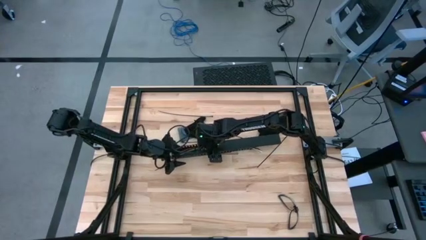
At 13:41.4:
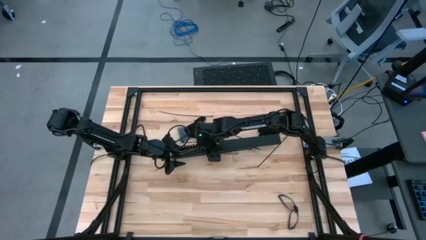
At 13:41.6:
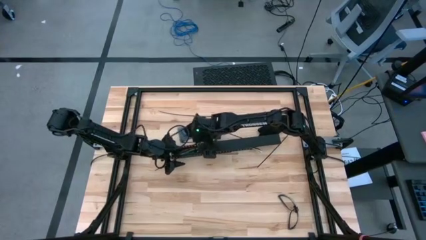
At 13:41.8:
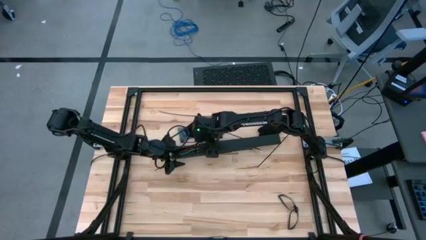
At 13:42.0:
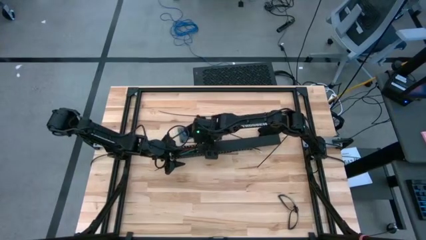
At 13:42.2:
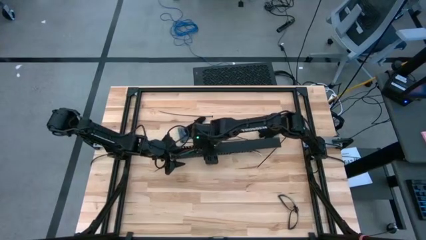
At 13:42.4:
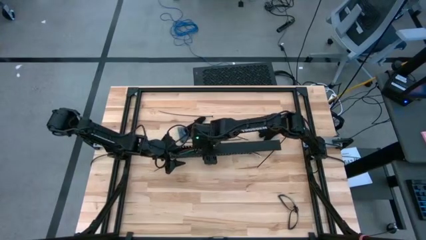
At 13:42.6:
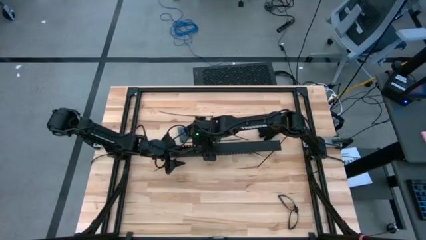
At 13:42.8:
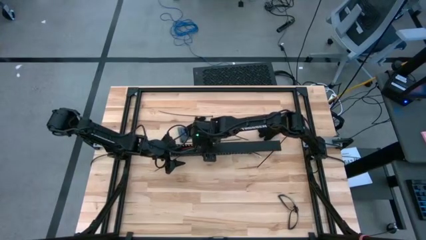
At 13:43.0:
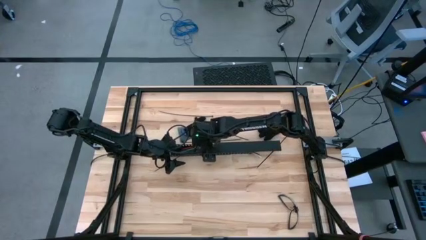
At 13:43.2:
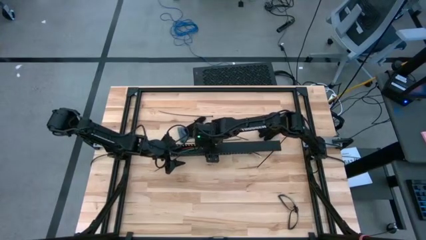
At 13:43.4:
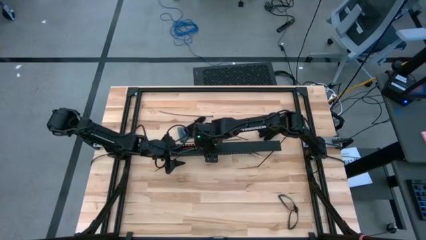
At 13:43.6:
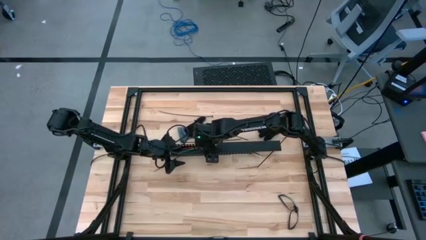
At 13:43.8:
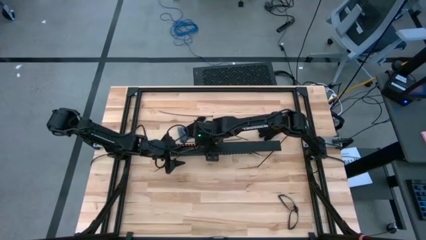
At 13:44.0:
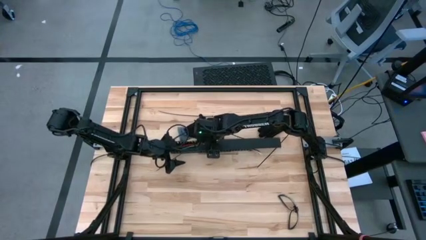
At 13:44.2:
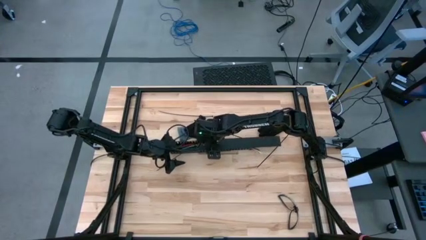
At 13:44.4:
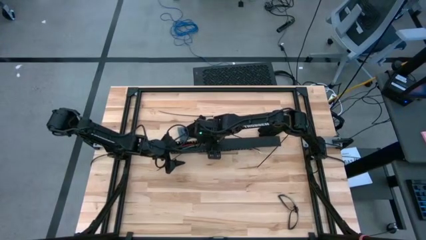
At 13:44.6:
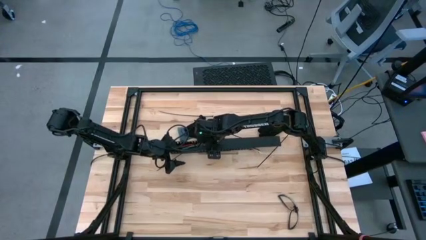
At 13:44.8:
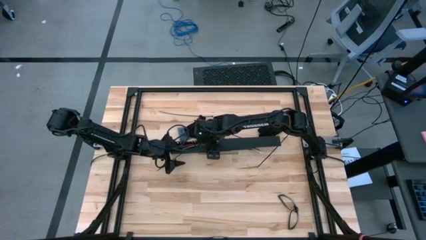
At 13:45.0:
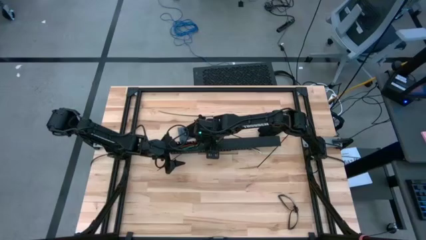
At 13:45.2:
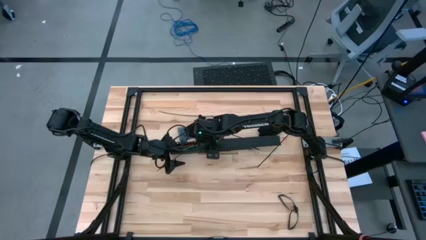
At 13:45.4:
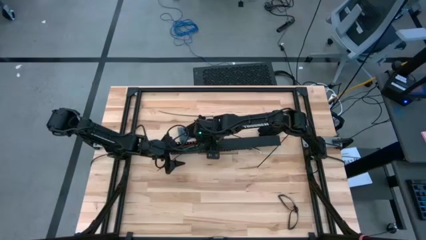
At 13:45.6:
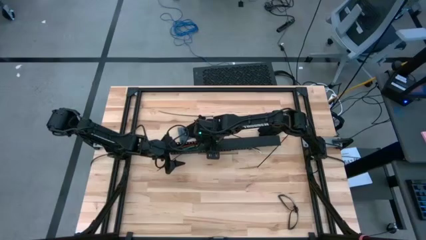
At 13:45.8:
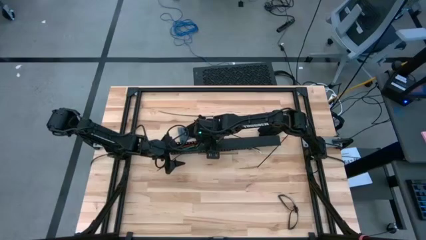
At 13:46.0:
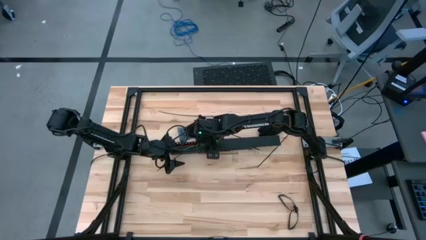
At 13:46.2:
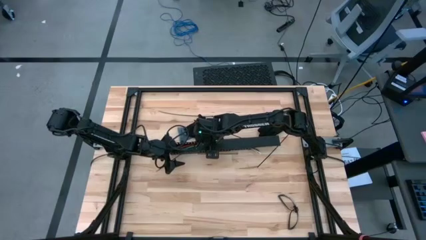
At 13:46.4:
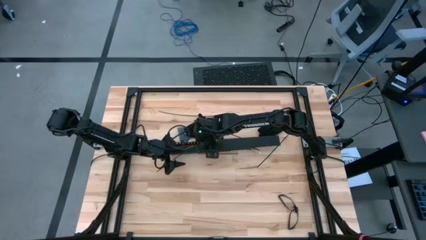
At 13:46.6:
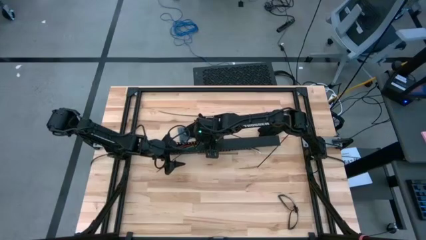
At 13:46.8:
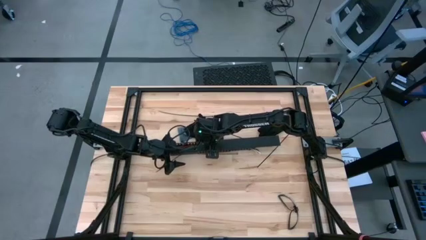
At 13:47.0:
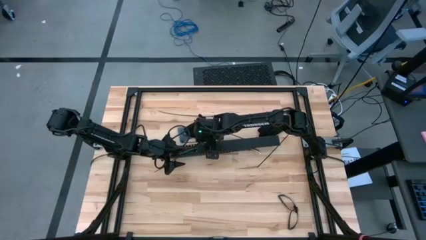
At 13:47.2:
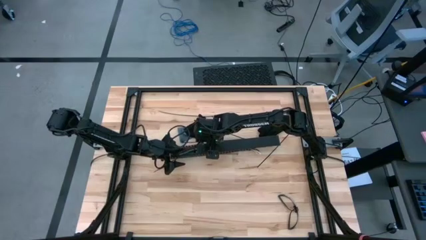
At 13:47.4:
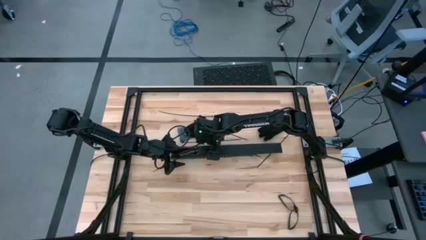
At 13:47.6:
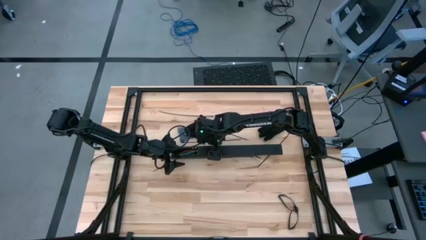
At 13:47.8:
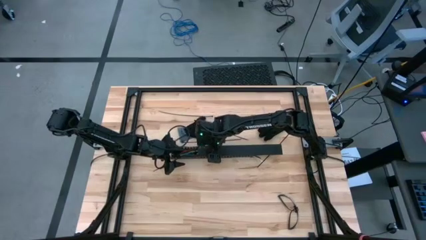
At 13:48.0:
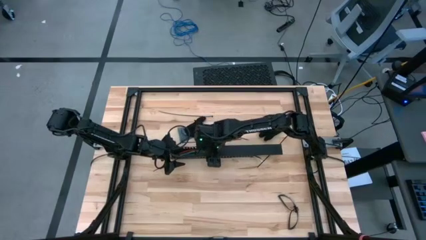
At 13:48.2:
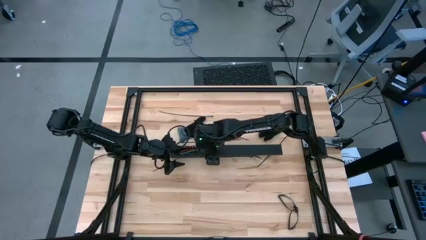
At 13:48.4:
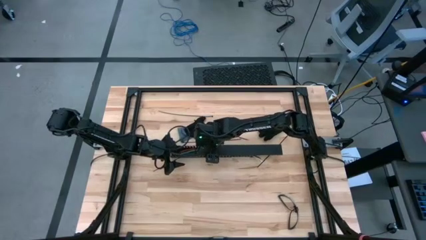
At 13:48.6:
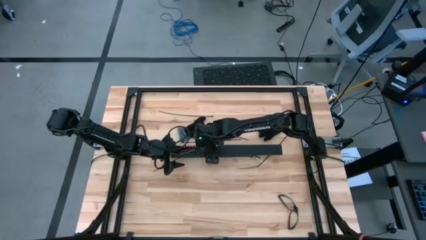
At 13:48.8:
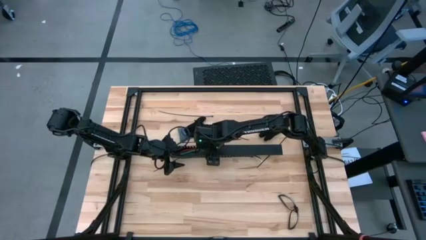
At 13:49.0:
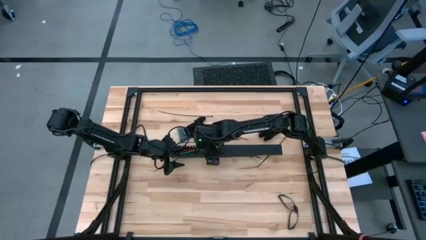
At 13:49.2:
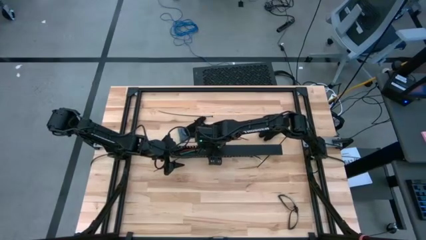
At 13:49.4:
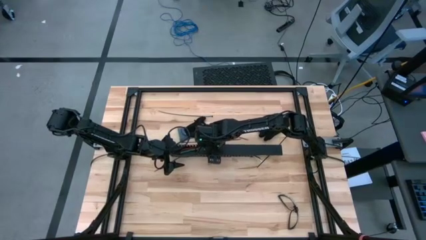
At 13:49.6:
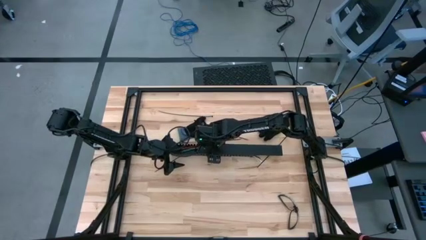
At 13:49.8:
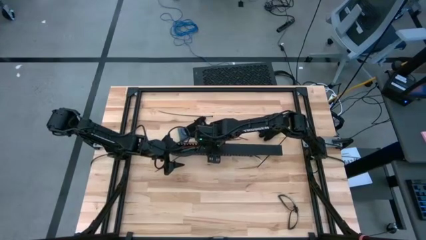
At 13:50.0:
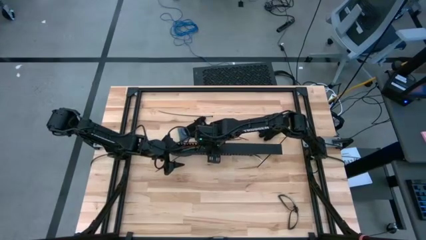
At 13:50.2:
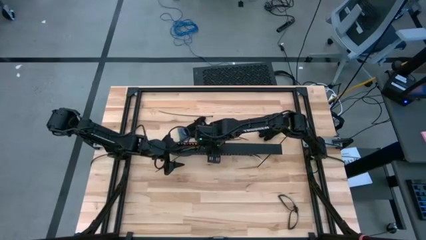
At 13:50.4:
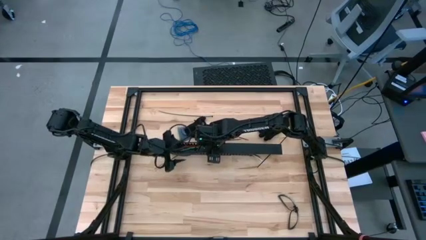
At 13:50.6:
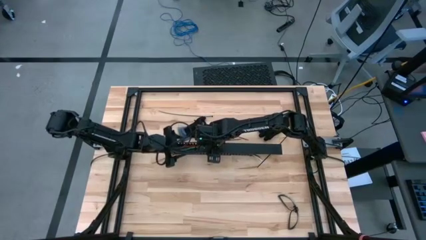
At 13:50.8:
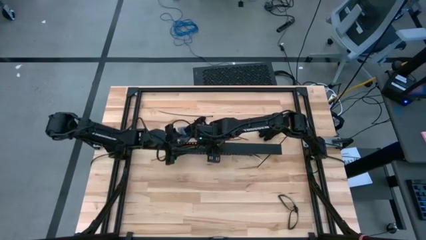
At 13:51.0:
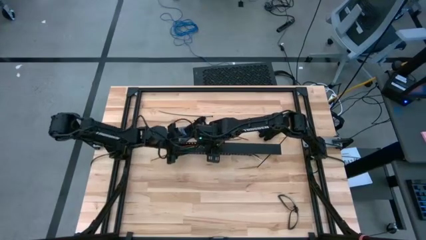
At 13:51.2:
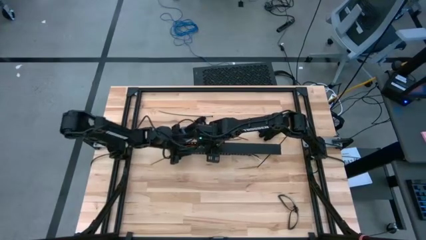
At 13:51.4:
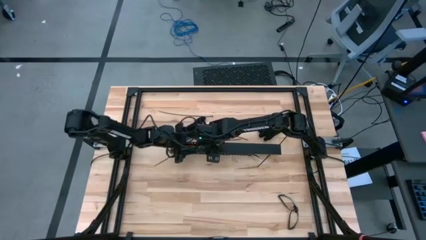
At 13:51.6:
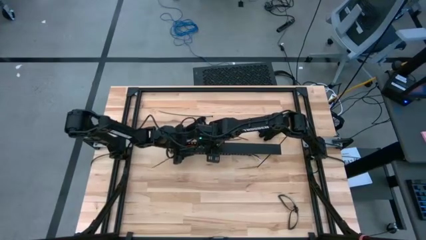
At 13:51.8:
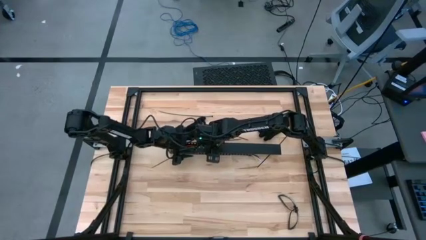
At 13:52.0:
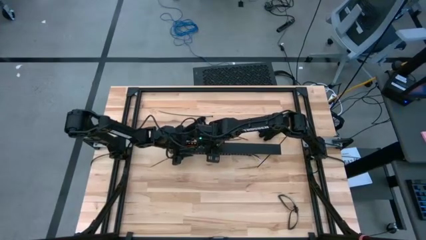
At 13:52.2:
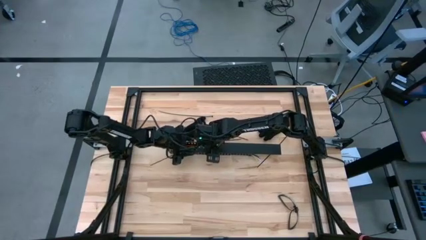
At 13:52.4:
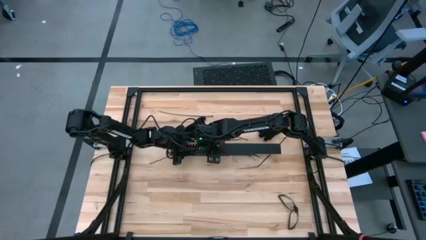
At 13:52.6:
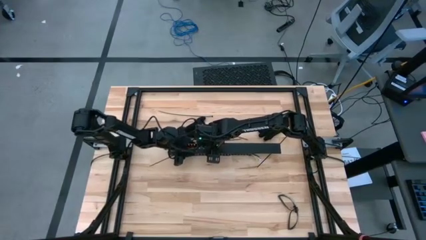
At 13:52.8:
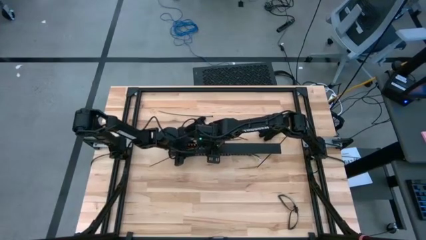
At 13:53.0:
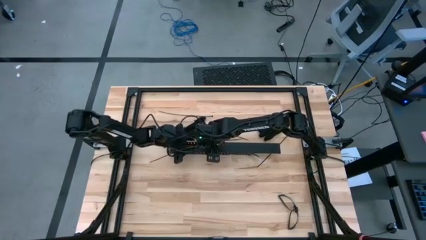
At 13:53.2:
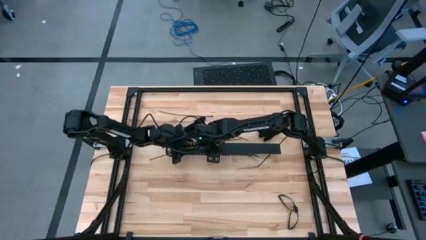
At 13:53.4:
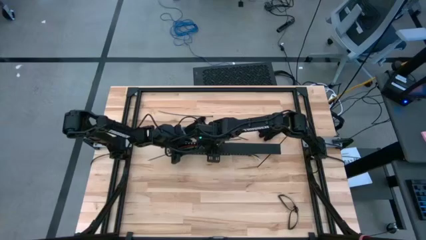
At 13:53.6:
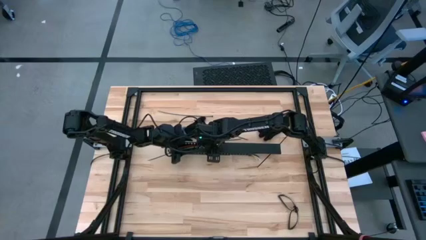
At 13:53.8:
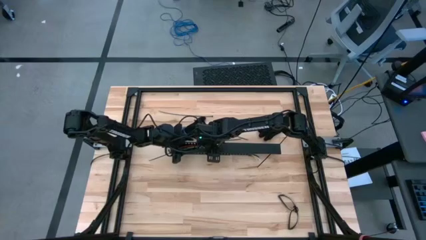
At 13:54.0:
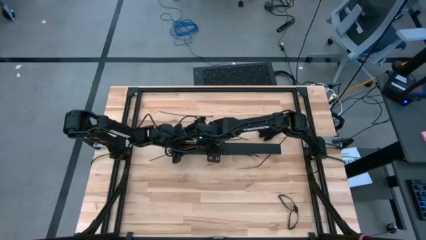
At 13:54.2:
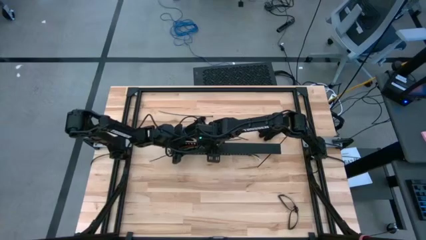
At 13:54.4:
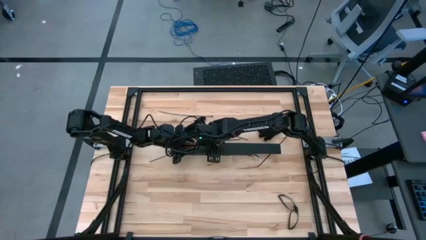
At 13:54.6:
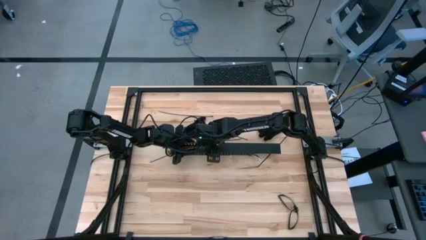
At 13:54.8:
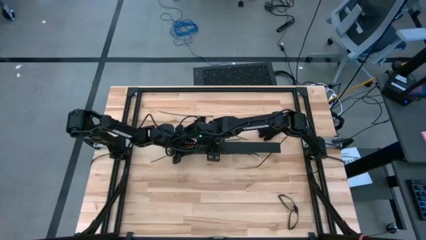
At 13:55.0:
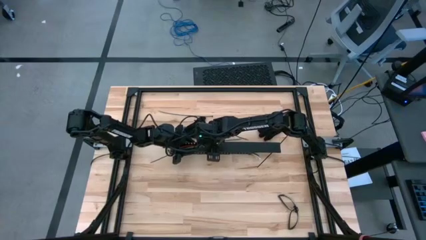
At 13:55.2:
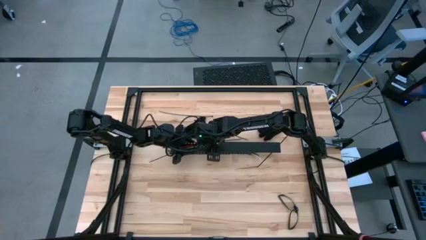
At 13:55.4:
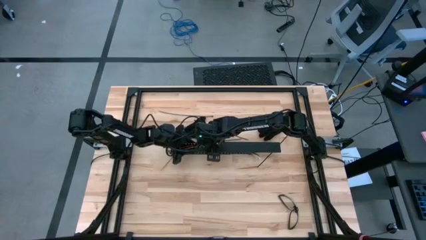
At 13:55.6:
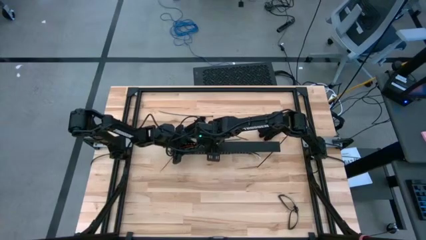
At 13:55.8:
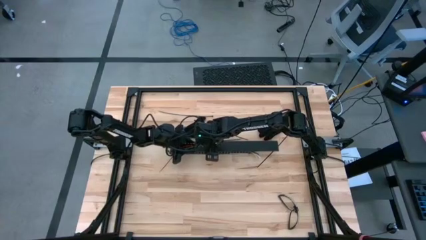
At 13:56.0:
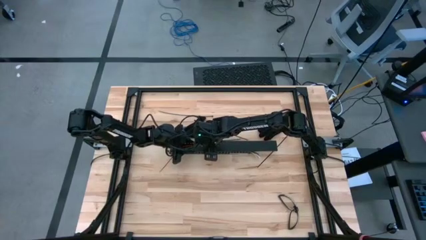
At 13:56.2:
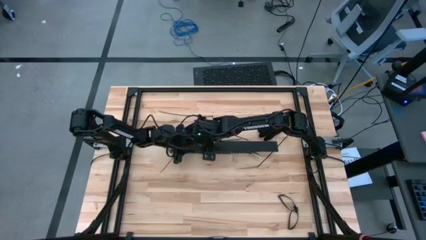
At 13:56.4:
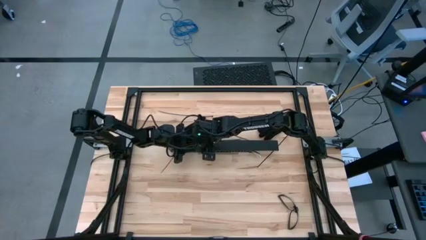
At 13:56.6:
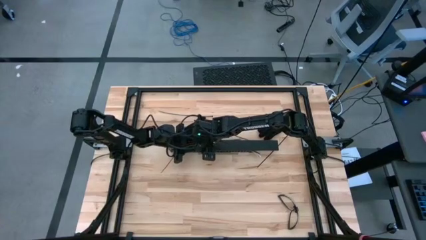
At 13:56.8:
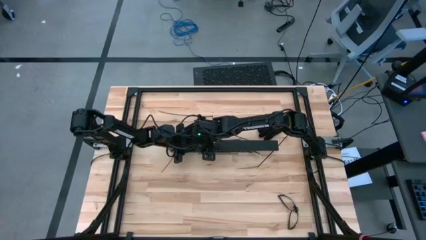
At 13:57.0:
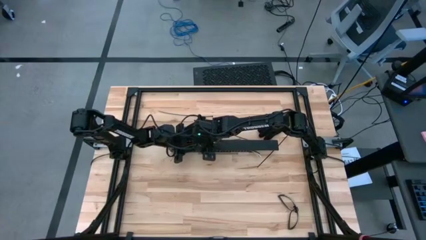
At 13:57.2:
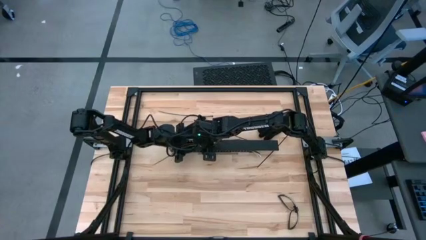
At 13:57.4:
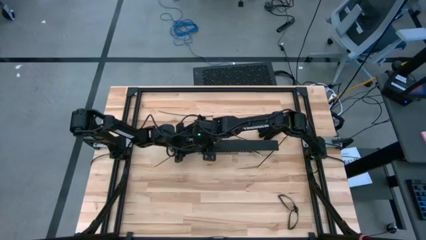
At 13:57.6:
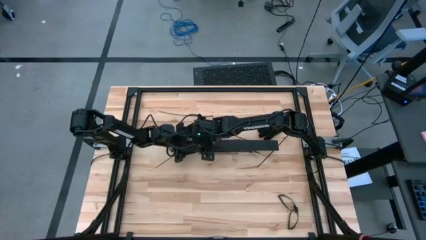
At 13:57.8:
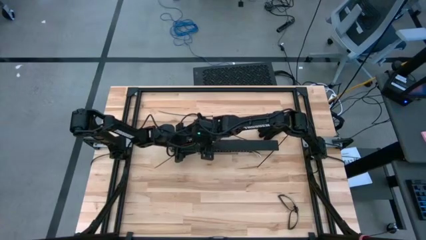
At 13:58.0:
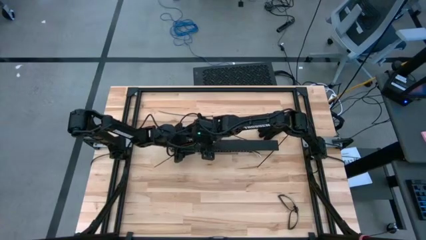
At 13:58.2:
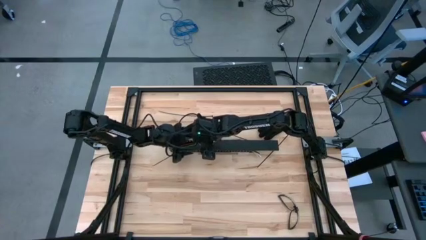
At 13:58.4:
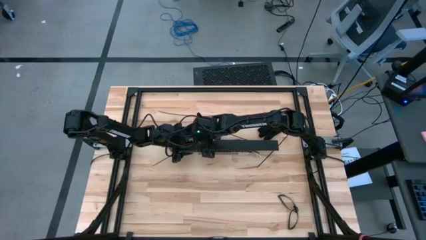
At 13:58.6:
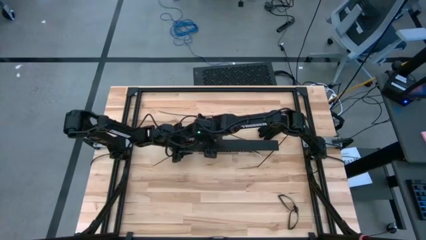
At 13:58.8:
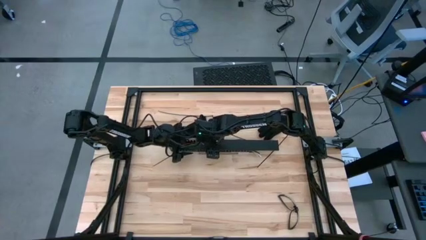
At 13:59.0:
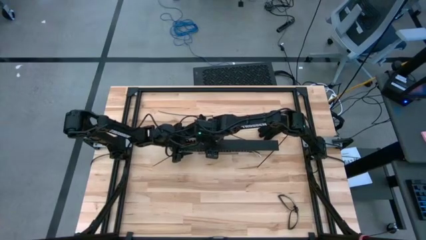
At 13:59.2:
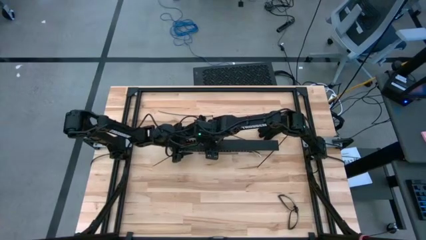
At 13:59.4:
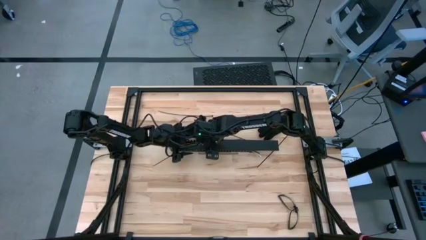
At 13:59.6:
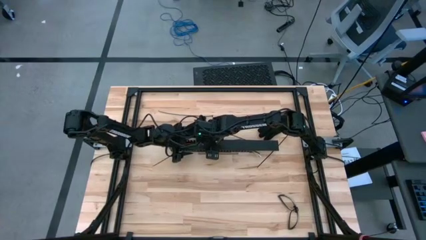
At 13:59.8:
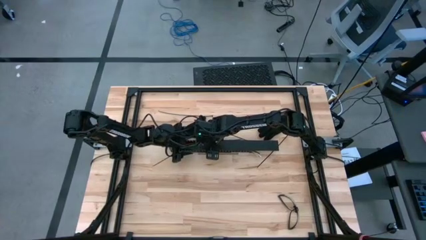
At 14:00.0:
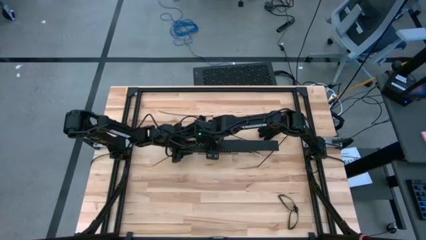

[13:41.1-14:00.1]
Task: Ziptie cables
Close the cable duct
